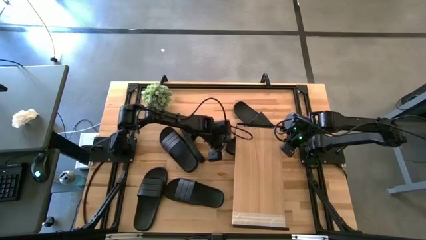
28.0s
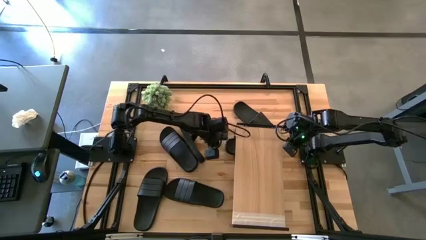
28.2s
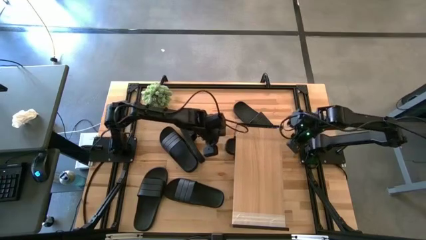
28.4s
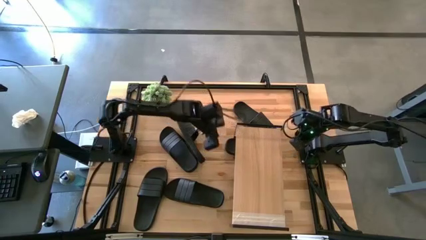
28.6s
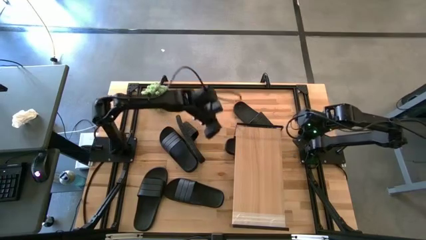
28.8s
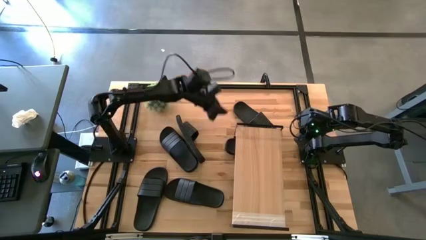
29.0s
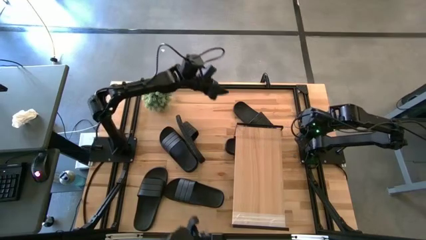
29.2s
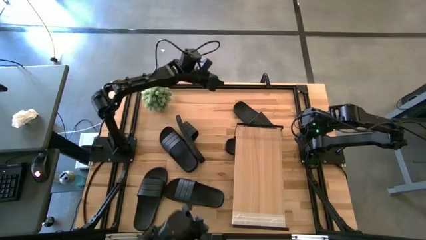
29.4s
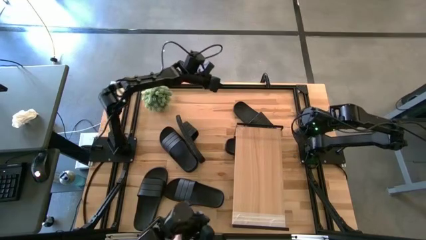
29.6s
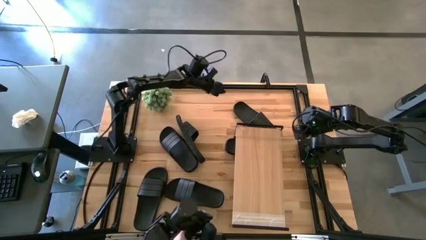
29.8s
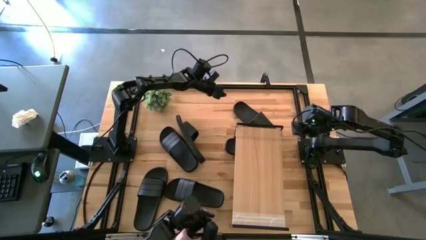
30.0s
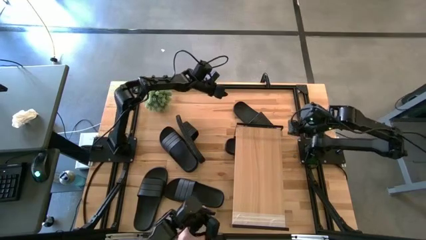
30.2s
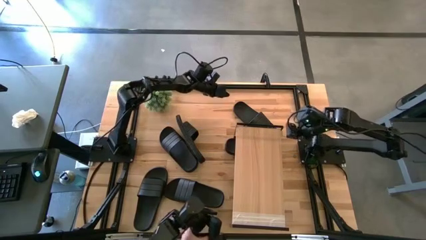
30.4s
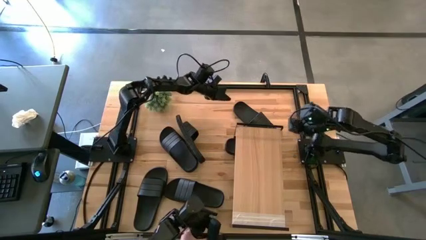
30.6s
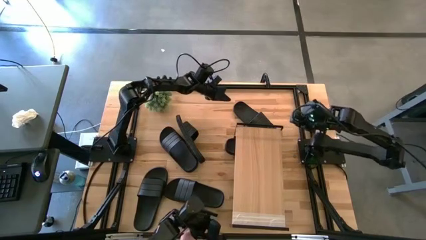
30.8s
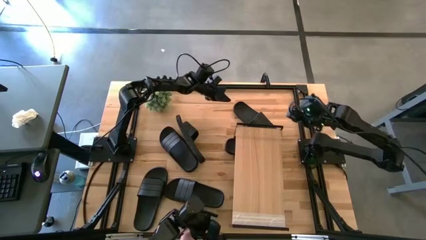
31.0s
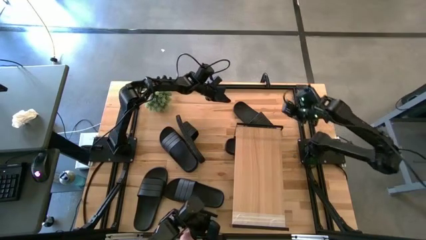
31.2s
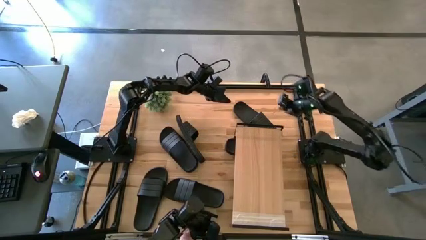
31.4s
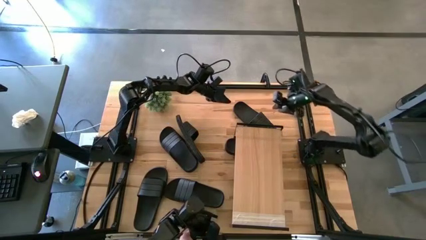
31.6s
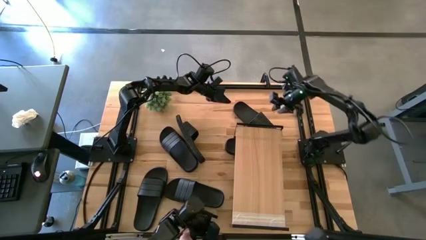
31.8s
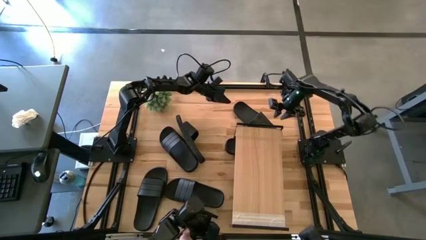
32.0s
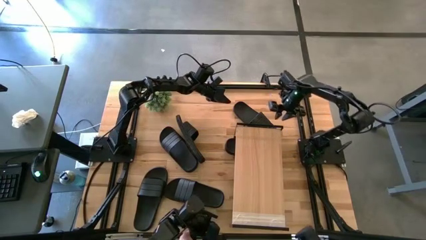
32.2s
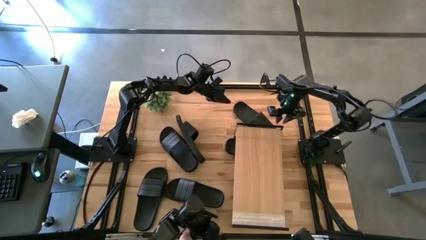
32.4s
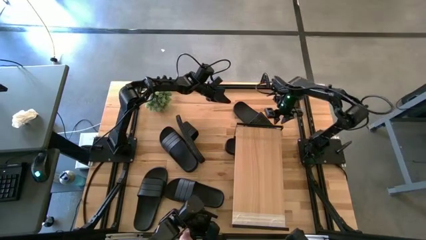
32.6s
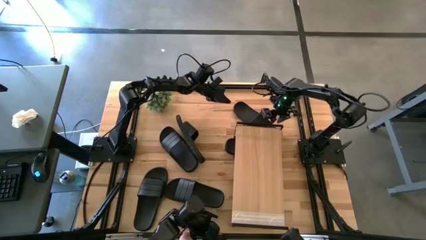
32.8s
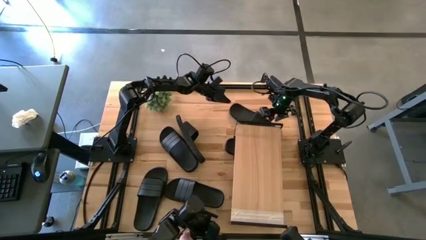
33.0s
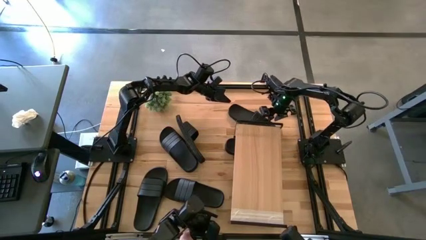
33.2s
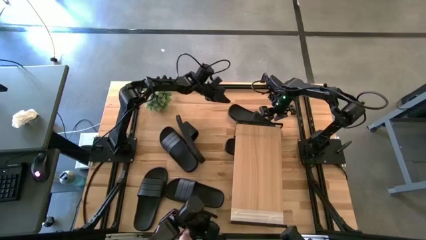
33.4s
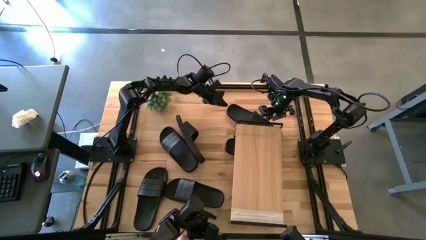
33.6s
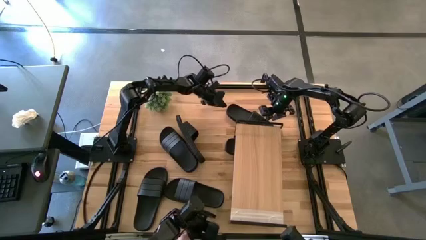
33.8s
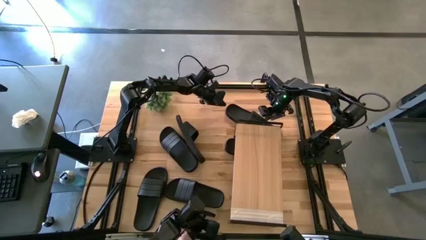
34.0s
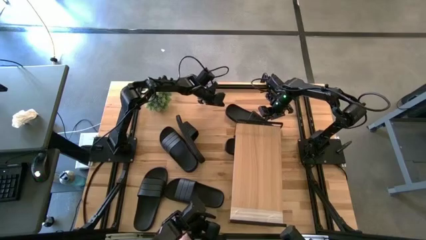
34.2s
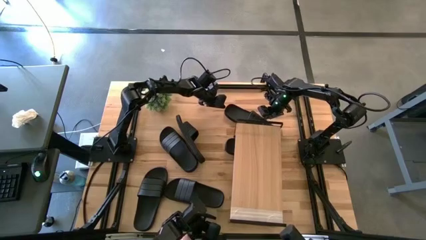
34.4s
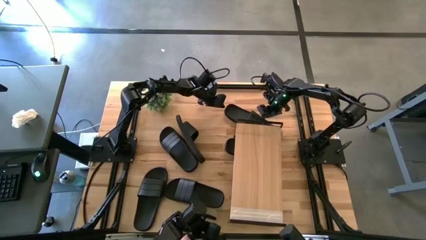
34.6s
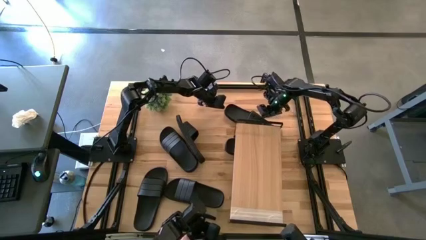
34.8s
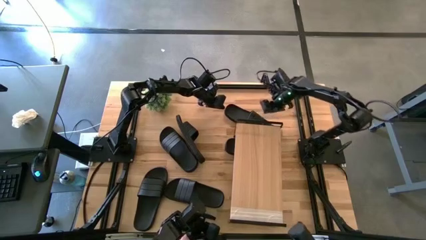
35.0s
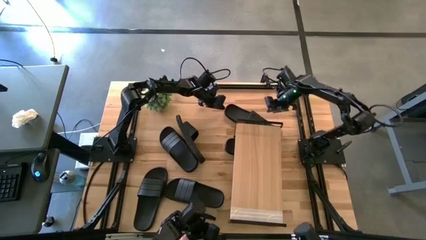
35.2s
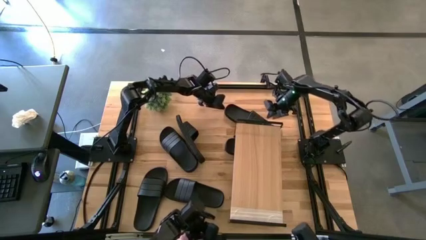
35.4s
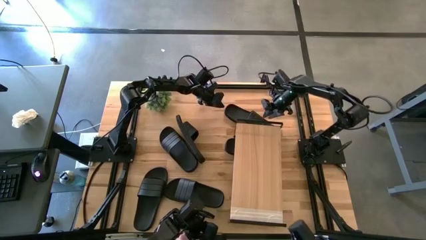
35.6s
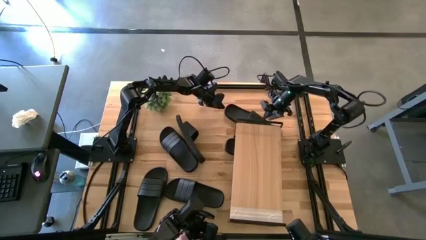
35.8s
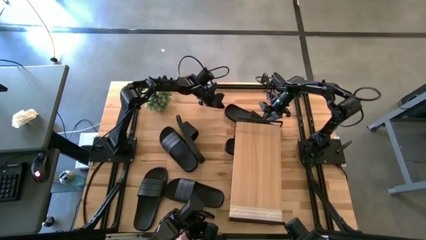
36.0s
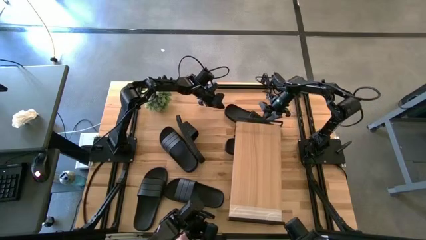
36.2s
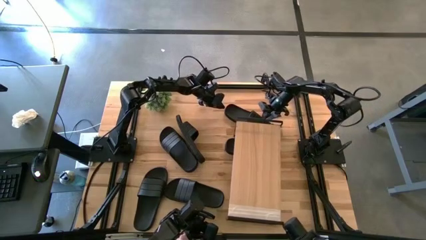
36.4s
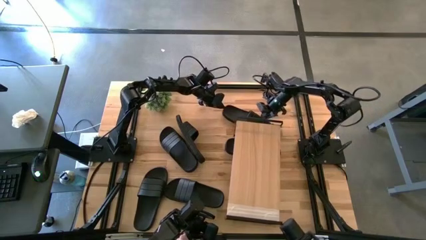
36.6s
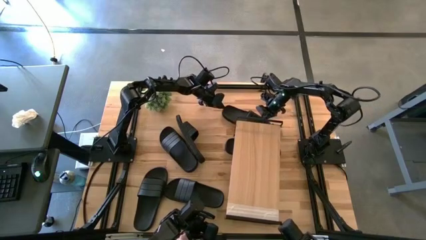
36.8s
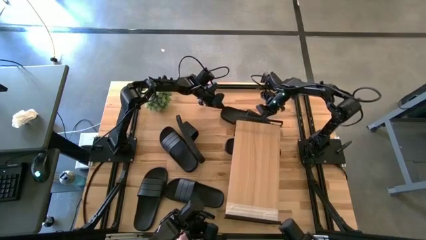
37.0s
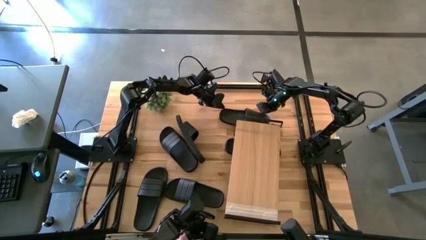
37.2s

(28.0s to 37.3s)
Task: Pick and place slides into the shelf
Put the black slide under the shelf

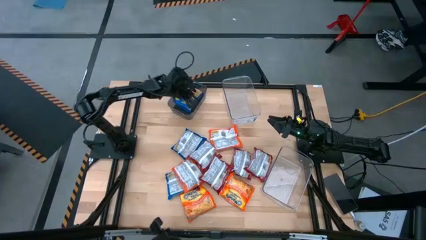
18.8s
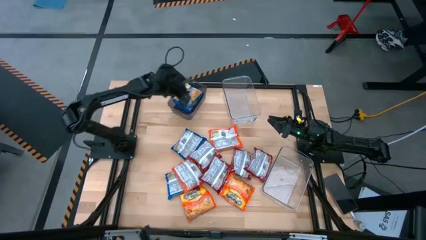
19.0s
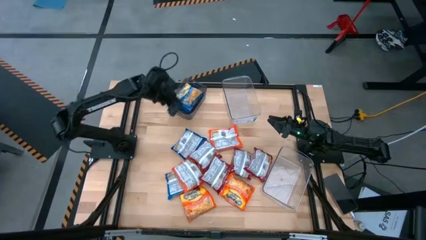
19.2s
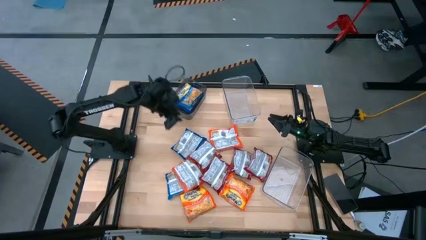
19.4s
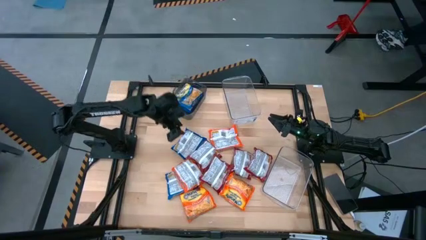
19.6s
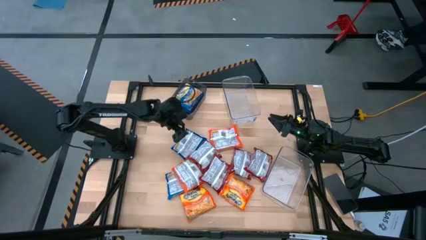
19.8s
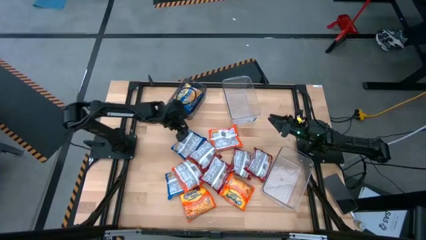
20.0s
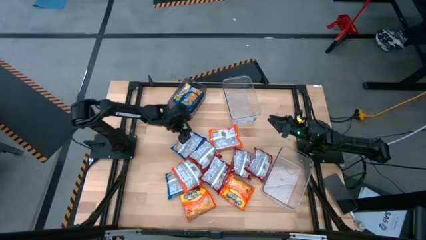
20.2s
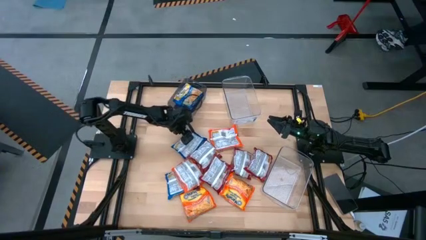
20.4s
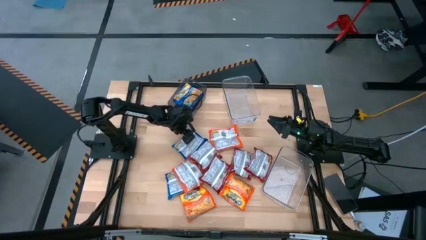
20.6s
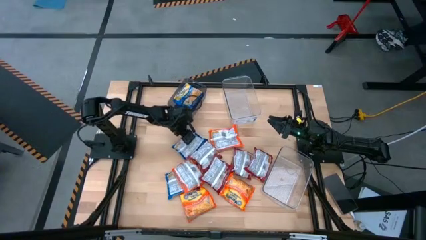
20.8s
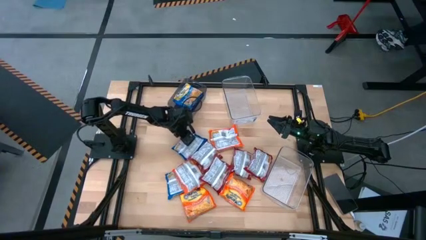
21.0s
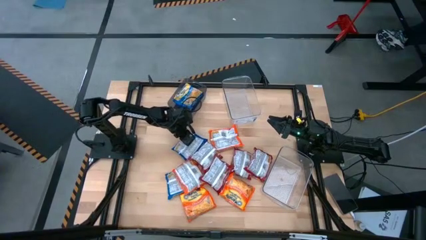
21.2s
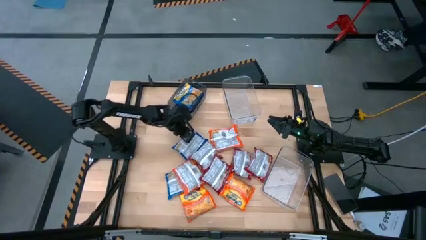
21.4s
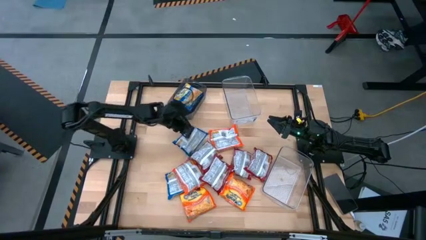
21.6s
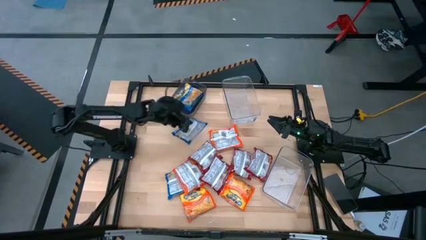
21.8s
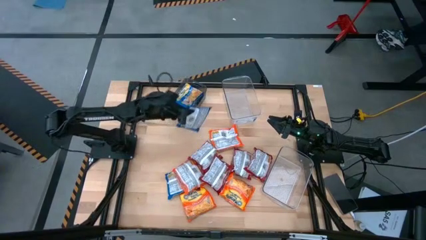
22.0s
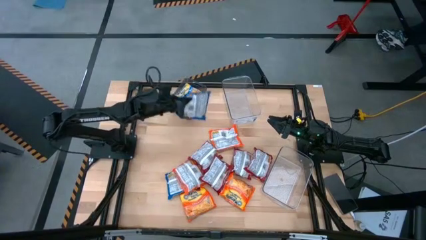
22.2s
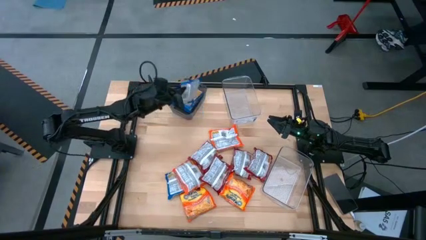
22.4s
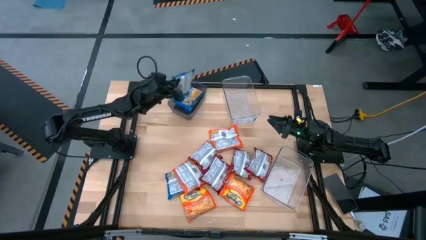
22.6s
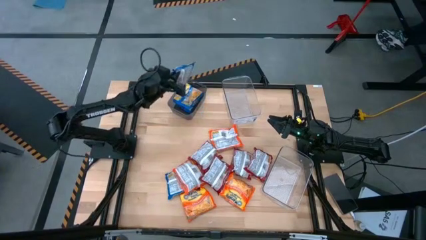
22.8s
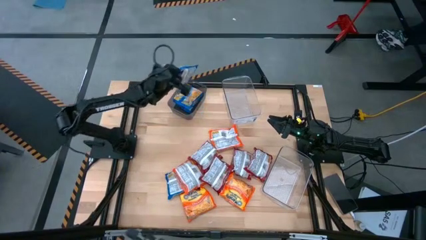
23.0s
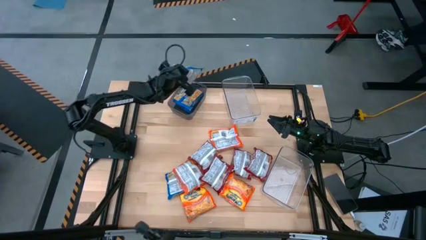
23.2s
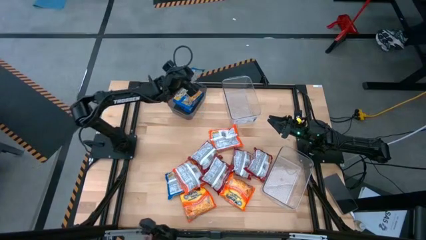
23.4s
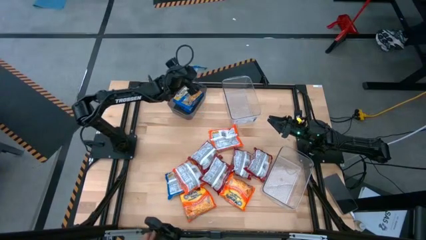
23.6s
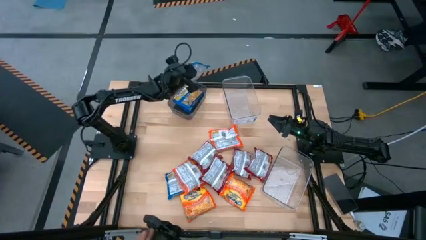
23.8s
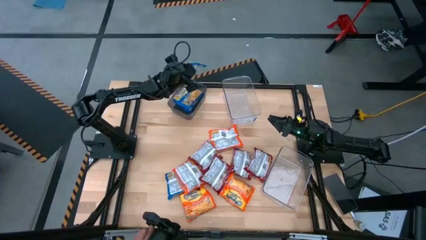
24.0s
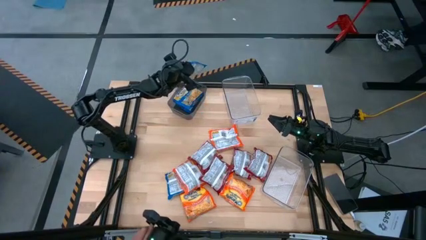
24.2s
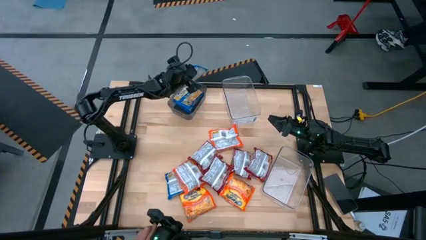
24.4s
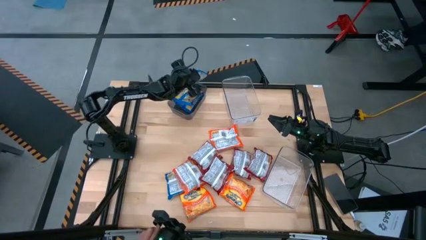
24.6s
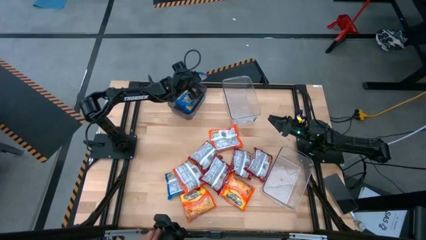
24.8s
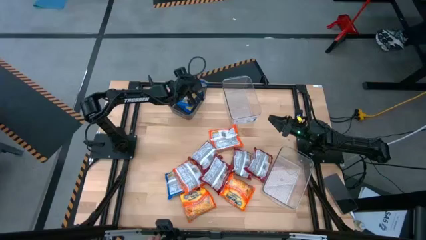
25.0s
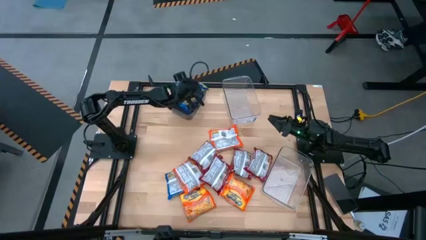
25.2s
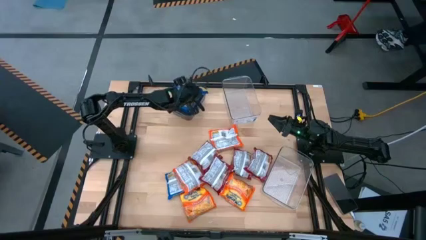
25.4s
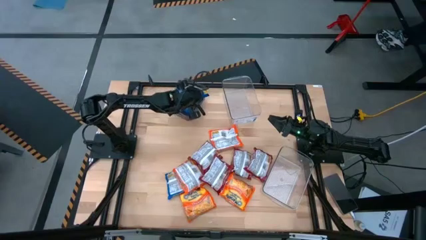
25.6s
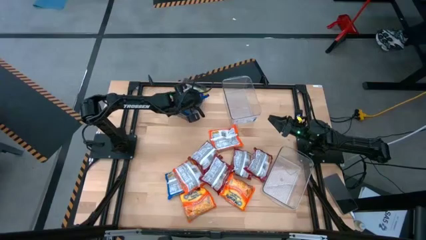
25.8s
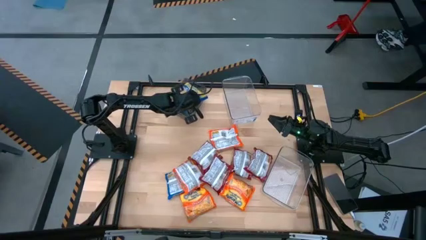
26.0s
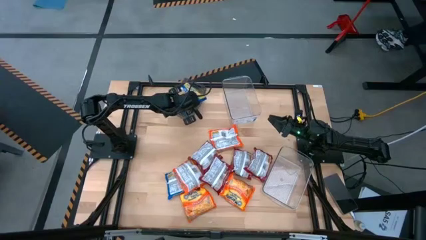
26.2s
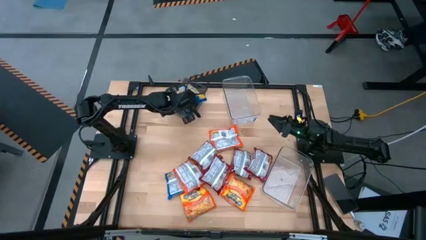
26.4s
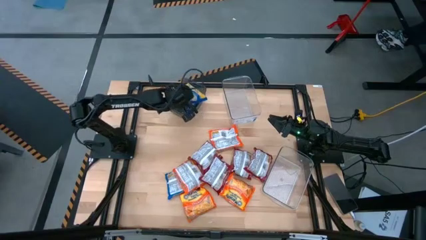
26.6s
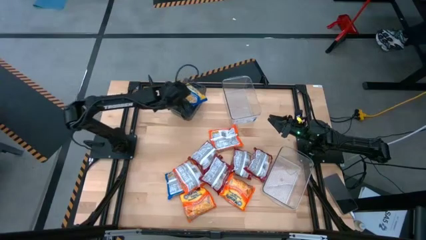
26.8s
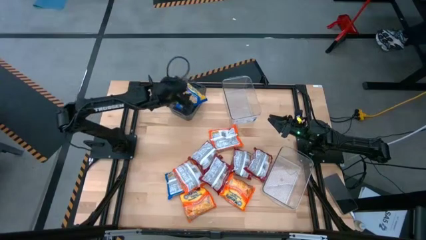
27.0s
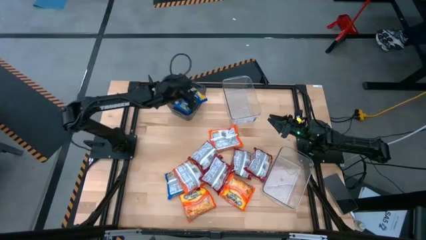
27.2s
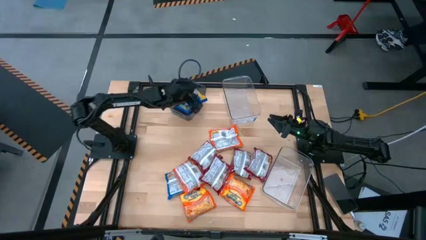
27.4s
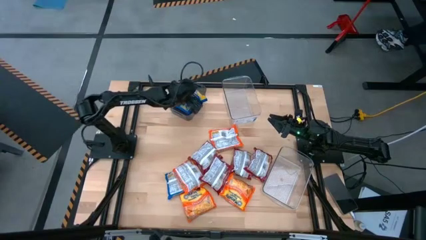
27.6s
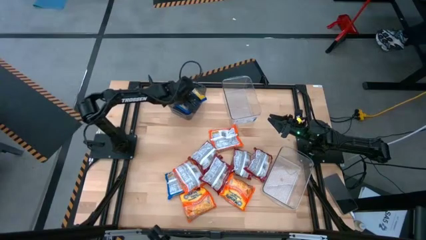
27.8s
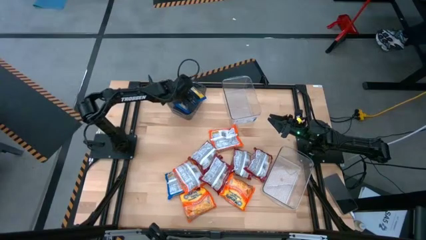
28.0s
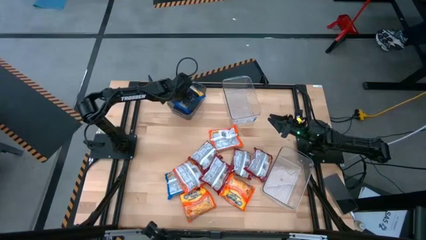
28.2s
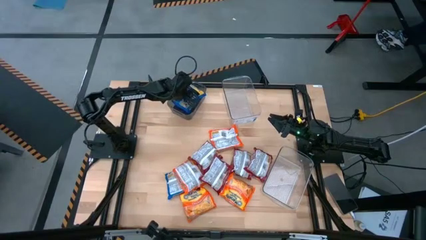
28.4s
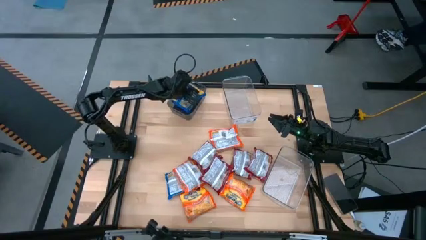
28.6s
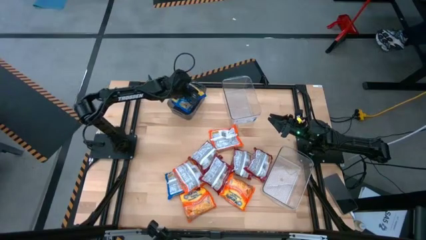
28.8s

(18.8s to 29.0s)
Task: Sort Maruchan noodles
Put the blue noodle pack into the black bin
